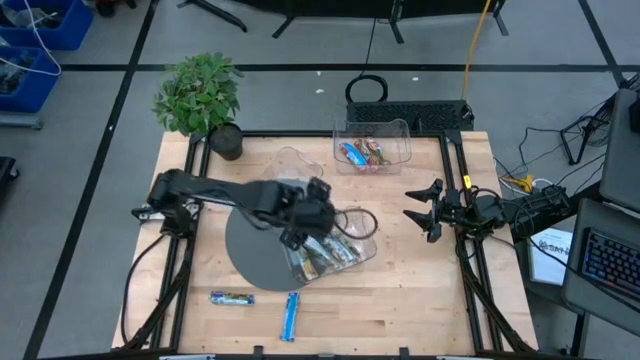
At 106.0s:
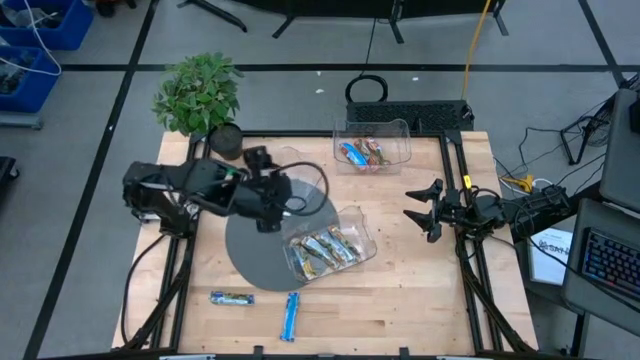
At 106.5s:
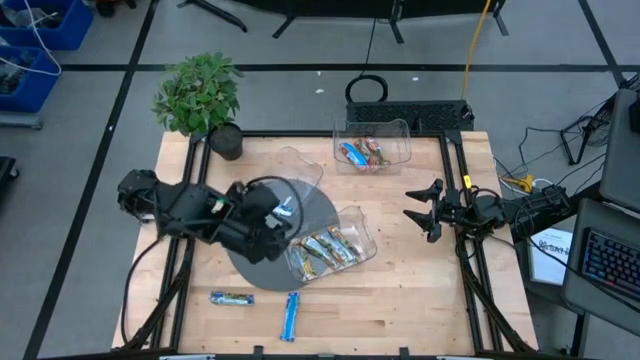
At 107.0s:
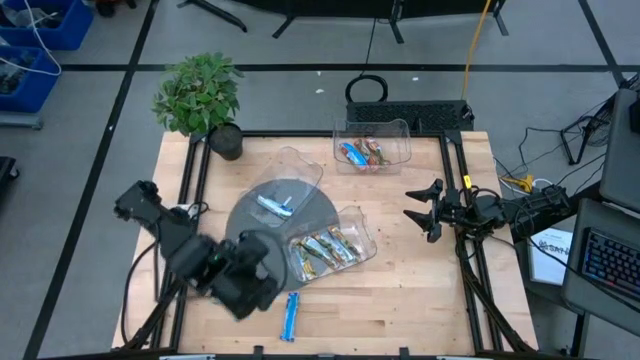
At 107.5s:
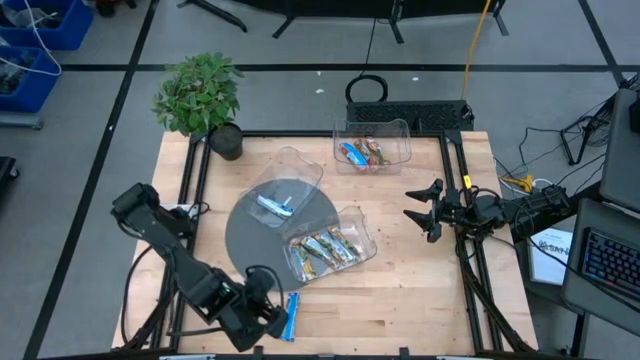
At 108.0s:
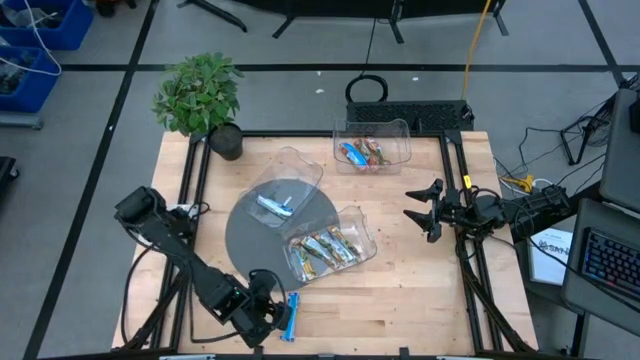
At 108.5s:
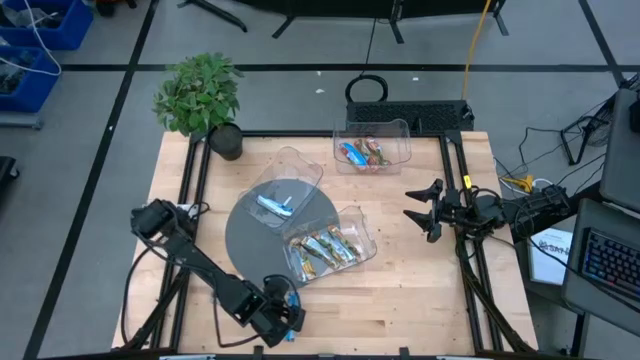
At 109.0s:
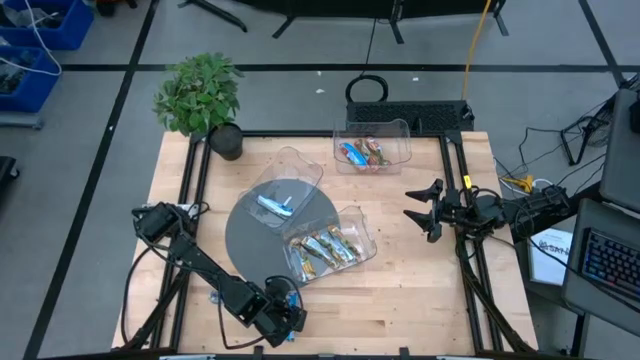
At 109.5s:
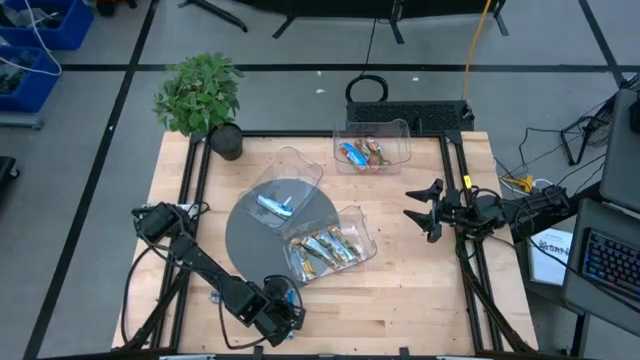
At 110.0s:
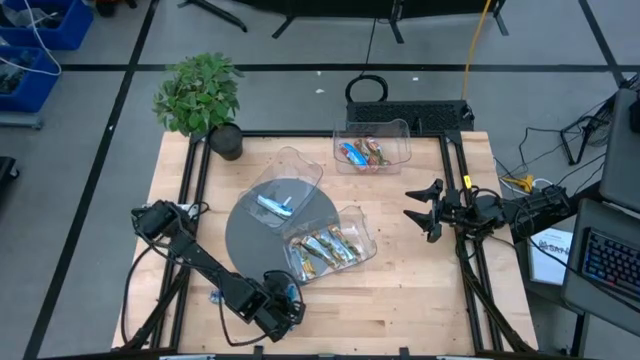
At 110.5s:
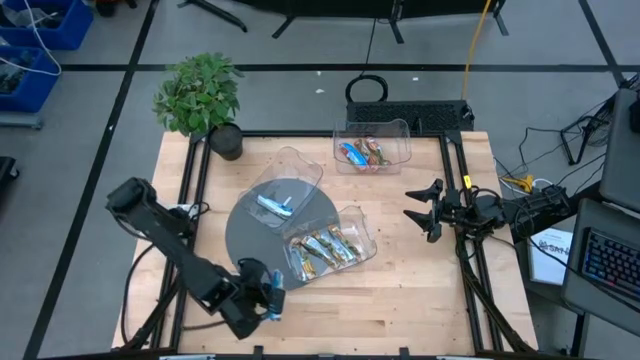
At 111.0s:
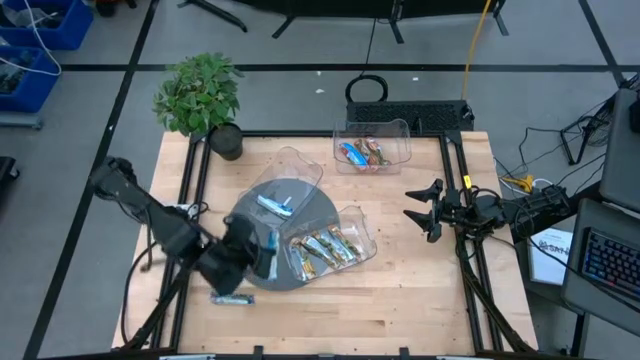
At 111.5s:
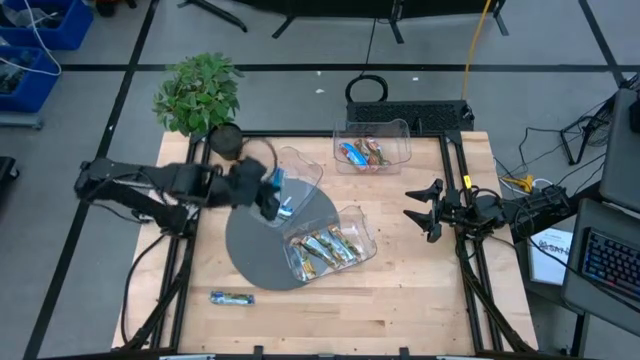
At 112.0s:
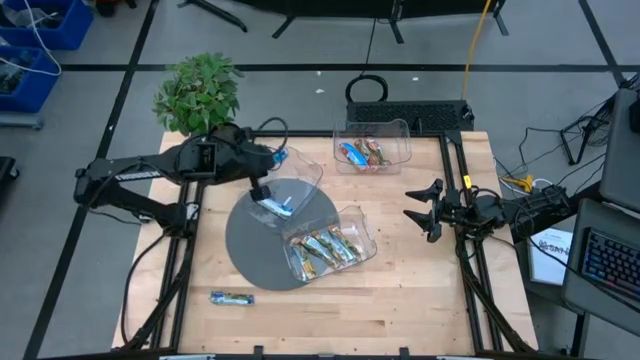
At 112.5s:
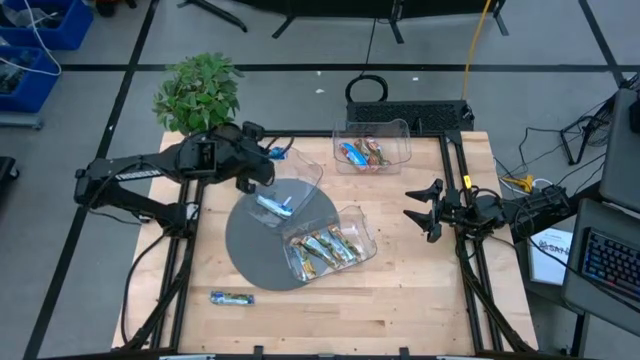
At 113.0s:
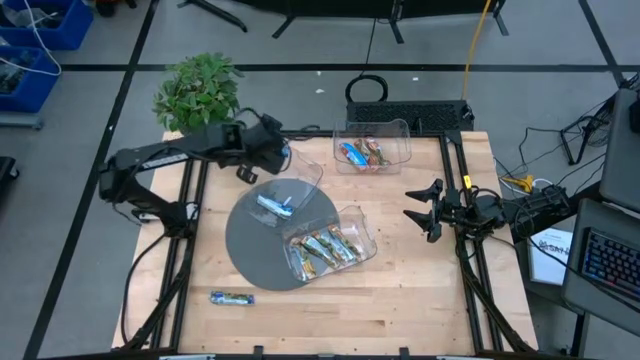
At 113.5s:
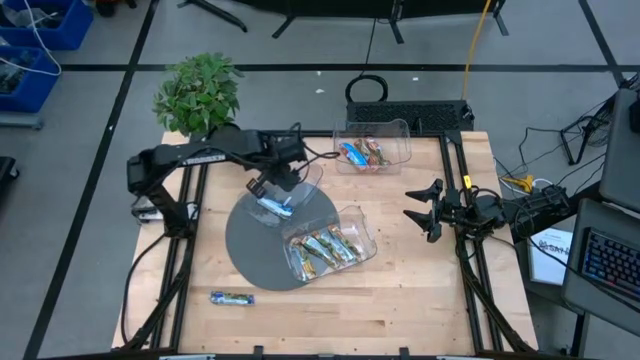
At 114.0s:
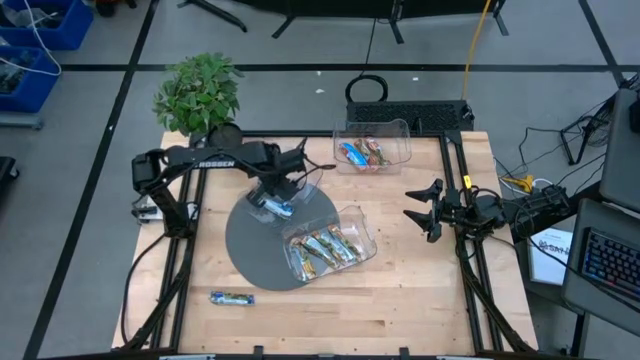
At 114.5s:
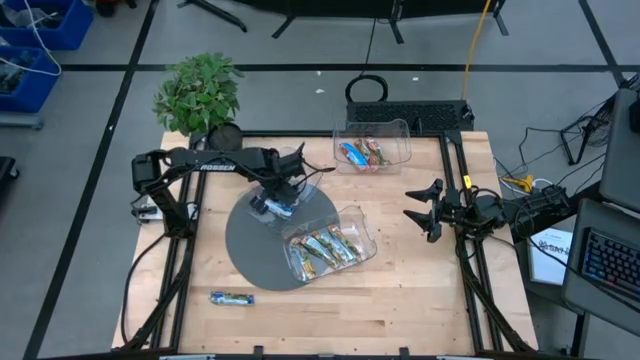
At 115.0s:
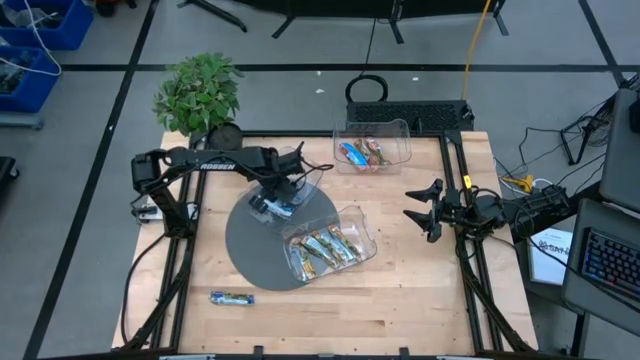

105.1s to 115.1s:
Task: Pick and place Granola Bars by type
Put the blue granola bar into the top left transparent bin

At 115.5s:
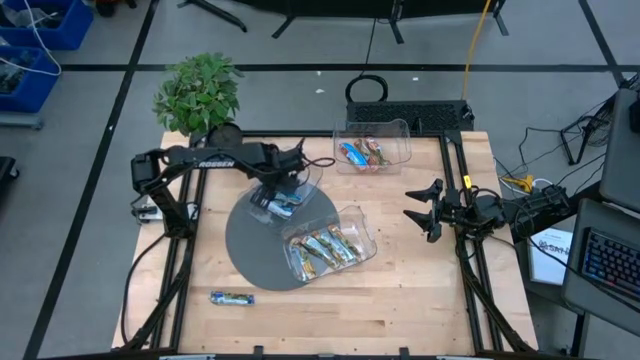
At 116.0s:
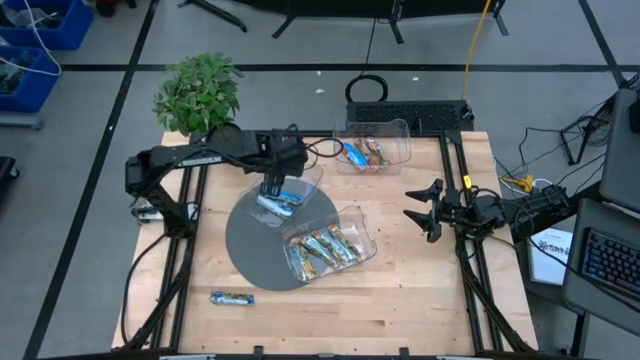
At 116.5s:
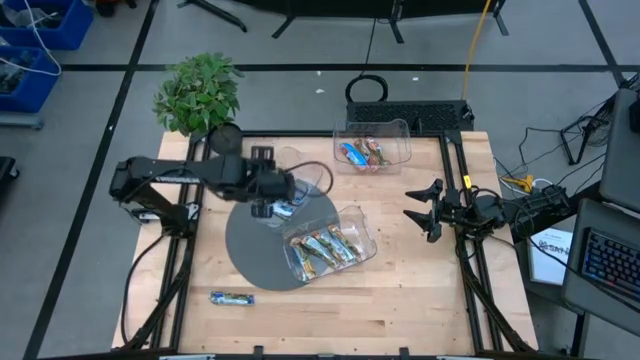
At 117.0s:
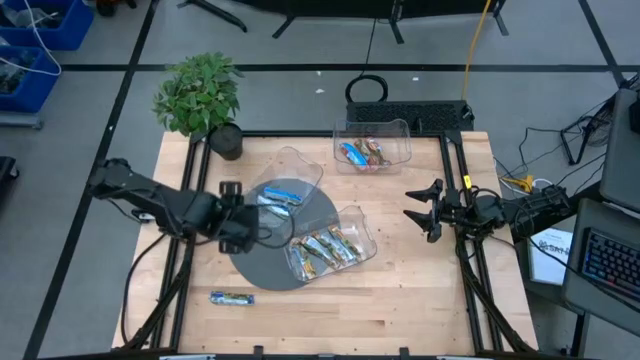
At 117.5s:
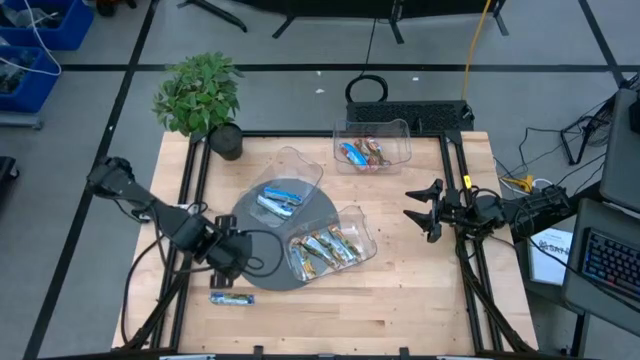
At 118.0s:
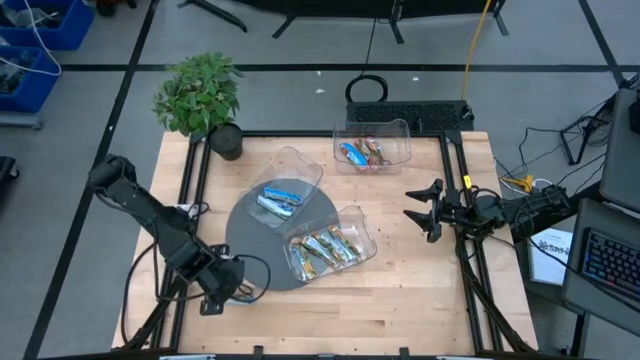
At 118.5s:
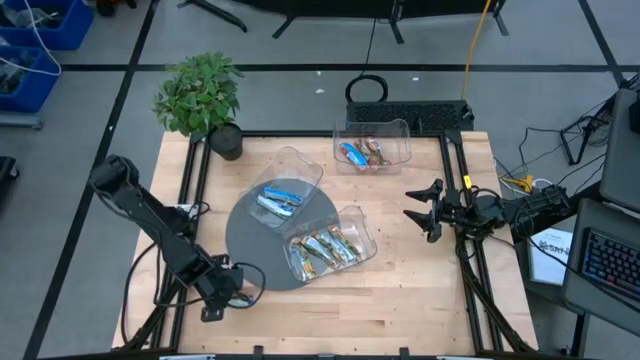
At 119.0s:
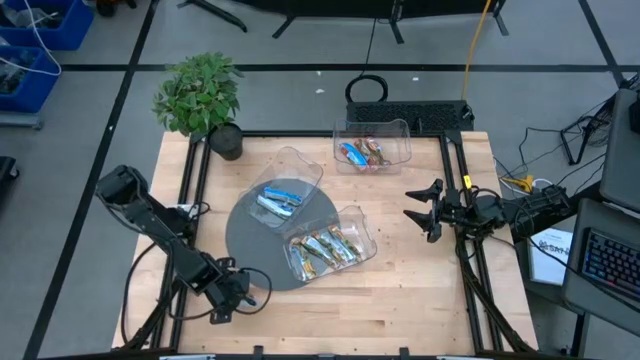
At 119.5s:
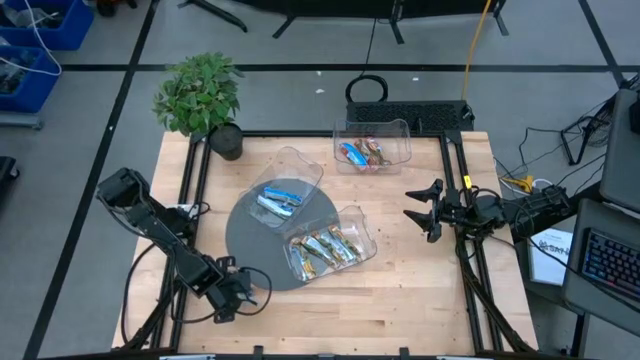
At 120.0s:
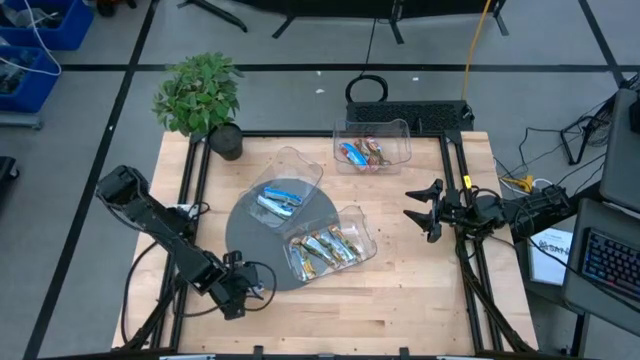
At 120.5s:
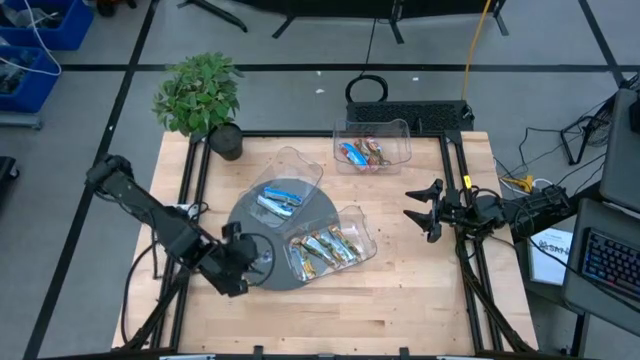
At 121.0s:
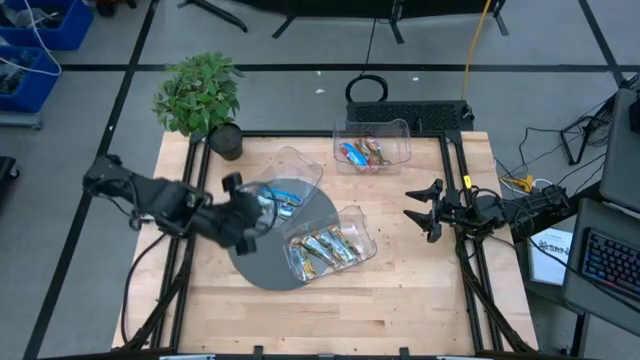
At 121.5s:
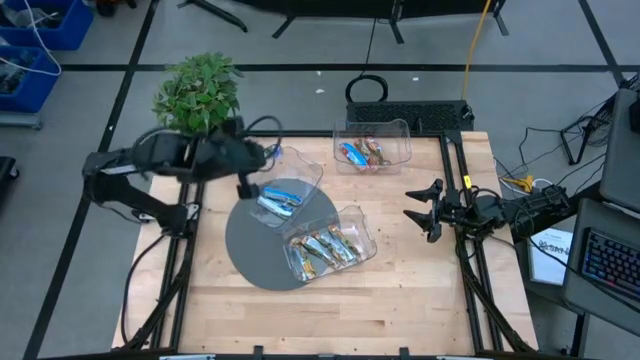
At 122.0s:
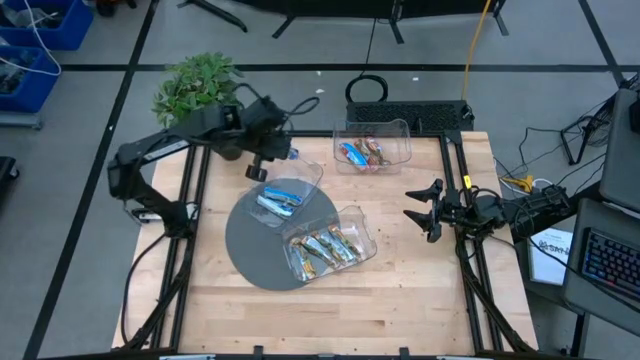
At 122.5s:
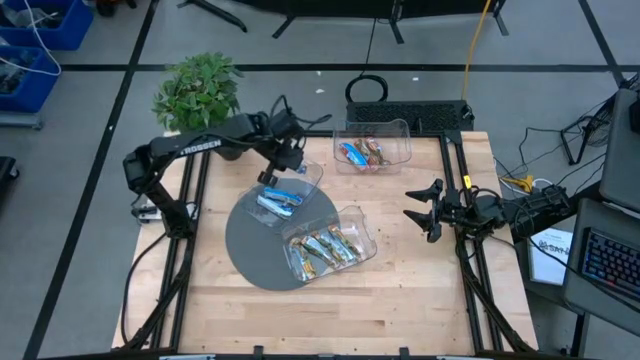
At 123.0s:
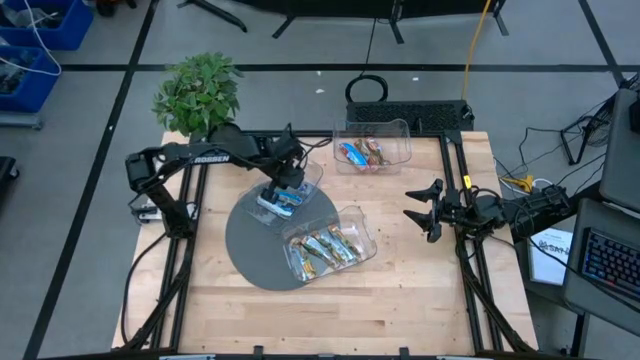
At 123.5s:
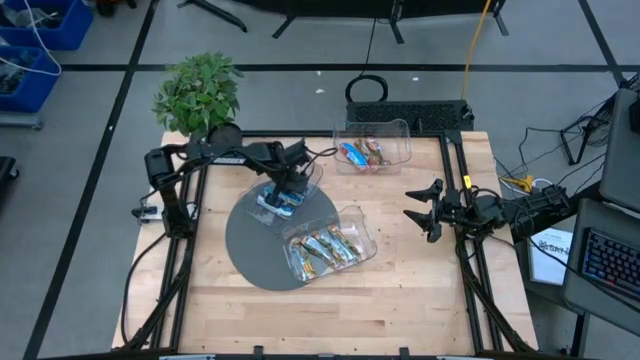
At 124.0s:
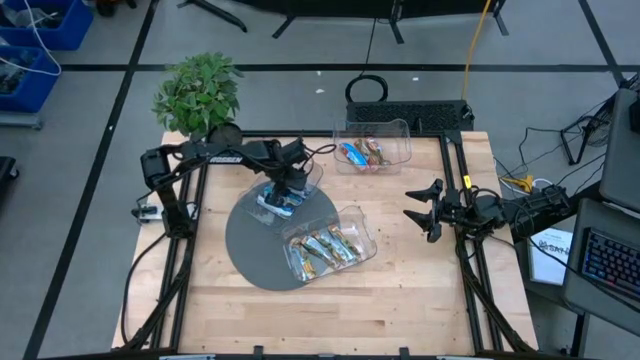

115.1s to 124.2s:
Put the blue granola bar into the top left transparent bin

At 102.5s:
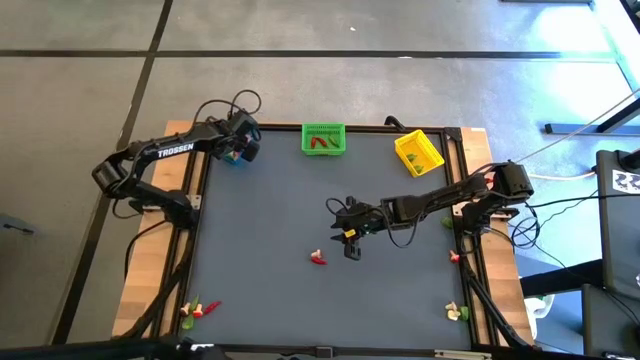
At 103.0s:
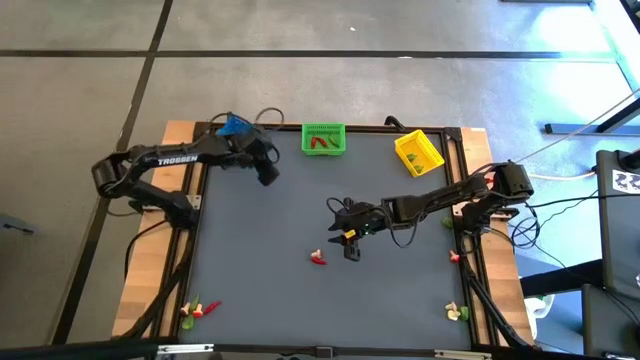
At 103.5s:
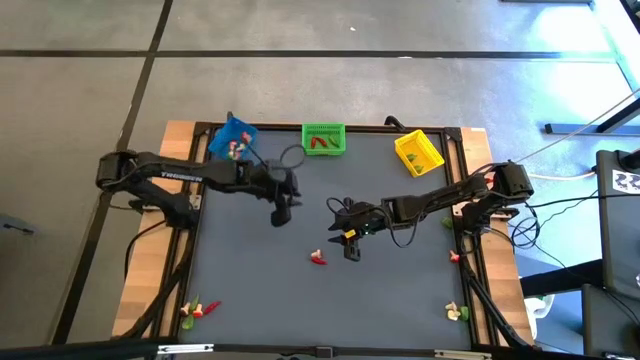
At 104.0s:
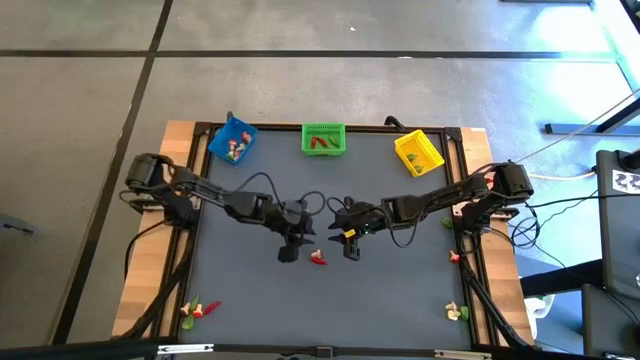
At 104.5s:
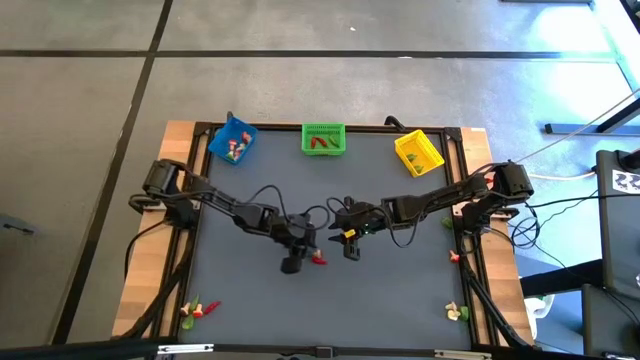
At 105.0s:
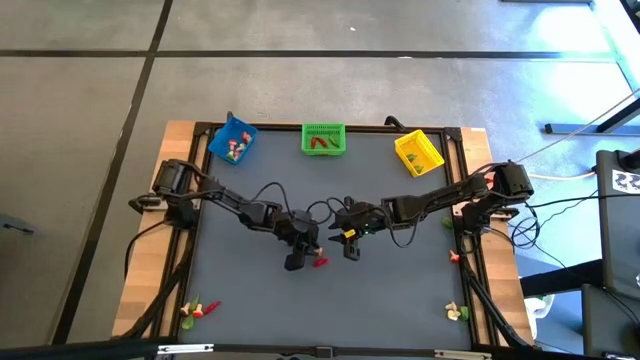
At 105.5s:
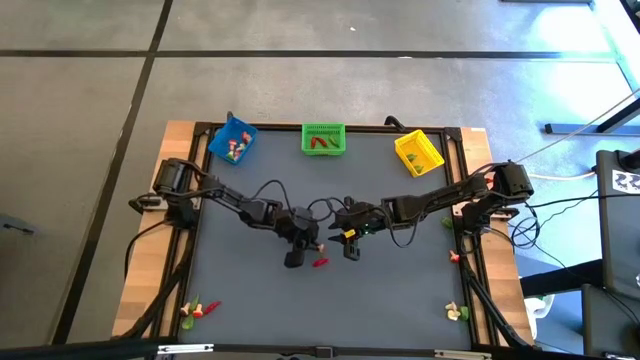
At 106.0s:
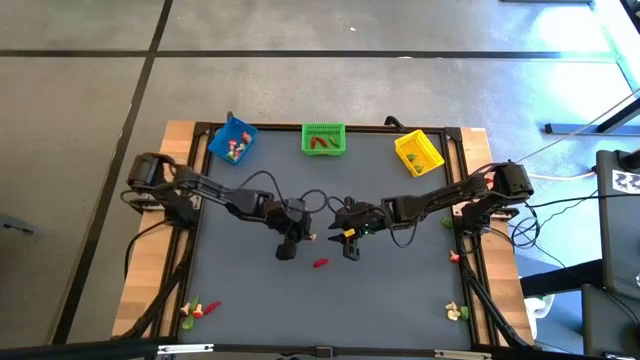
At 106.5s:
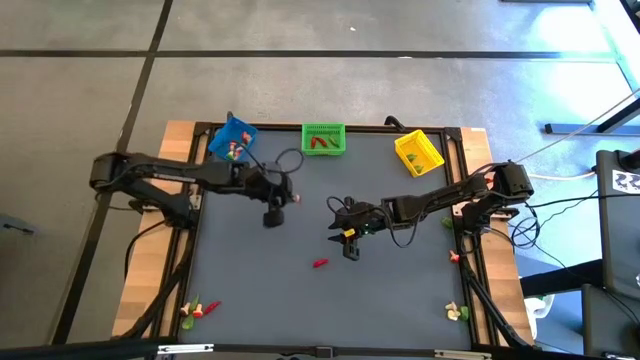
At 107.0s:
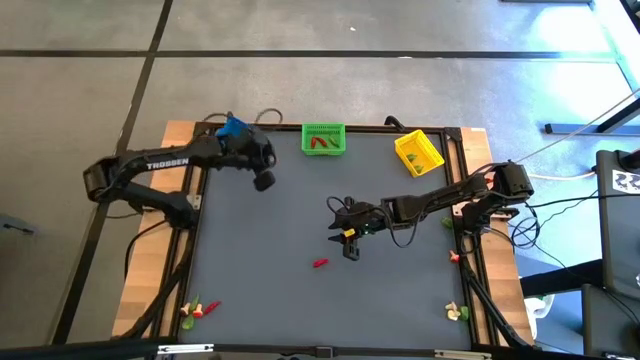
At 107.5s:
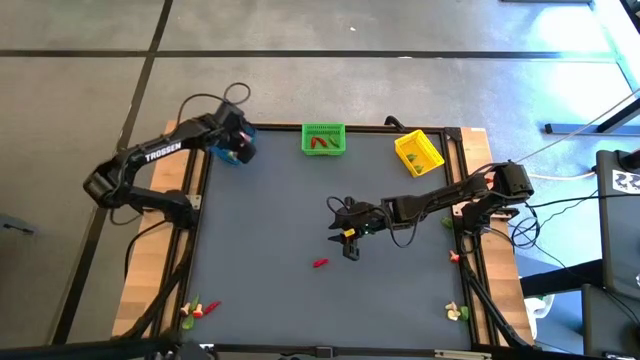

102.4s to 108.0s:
Task: Sort produce into baskets
Put the brown mushroom into the blue bin
